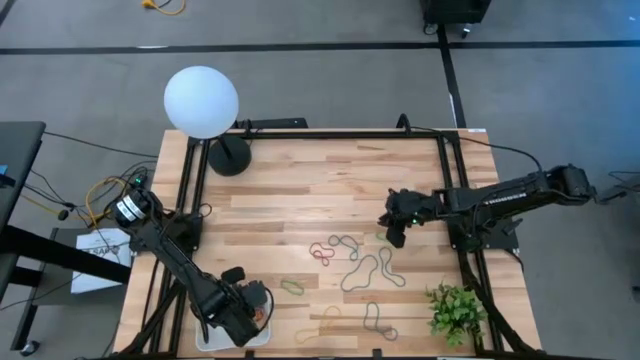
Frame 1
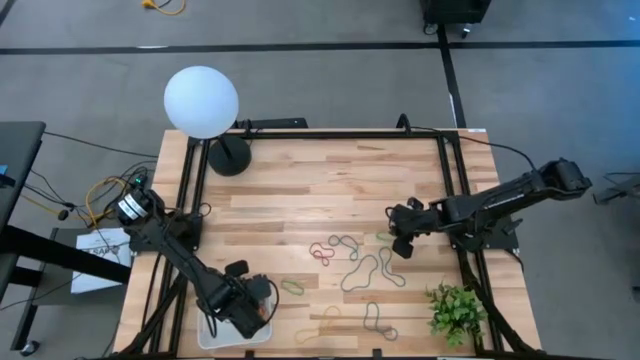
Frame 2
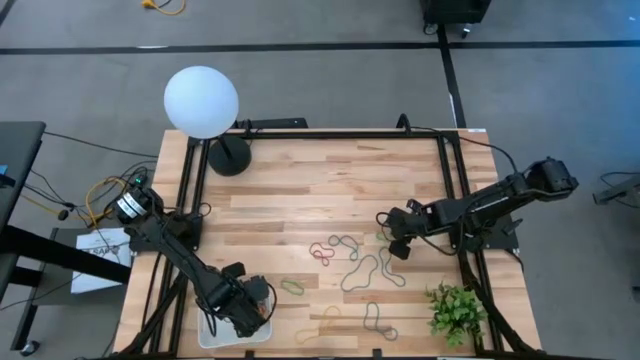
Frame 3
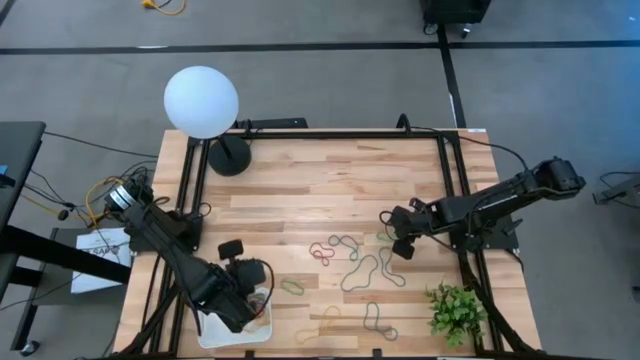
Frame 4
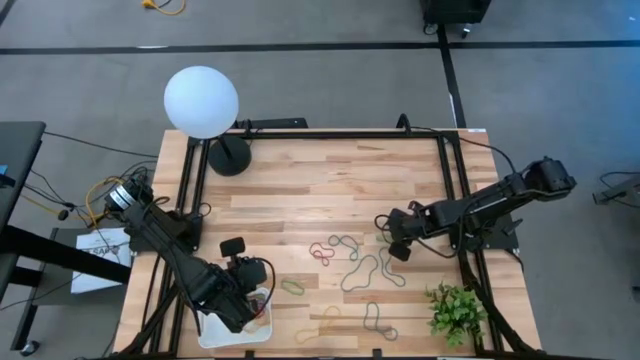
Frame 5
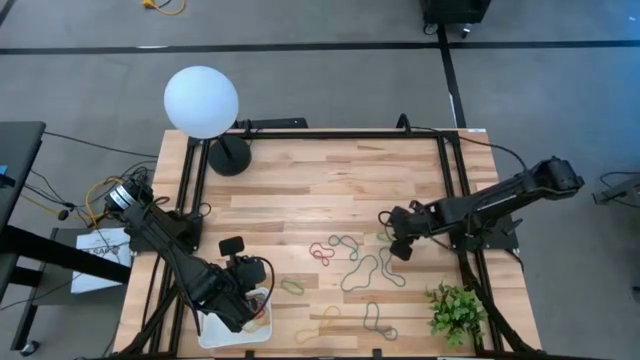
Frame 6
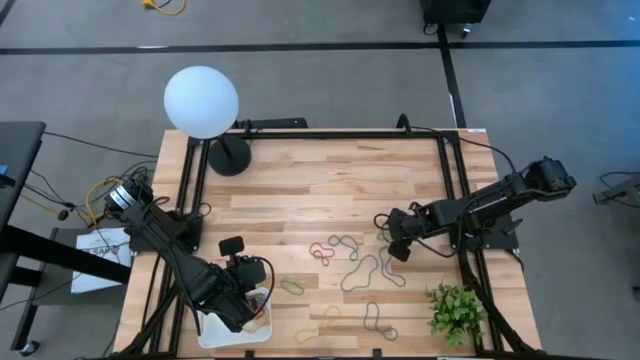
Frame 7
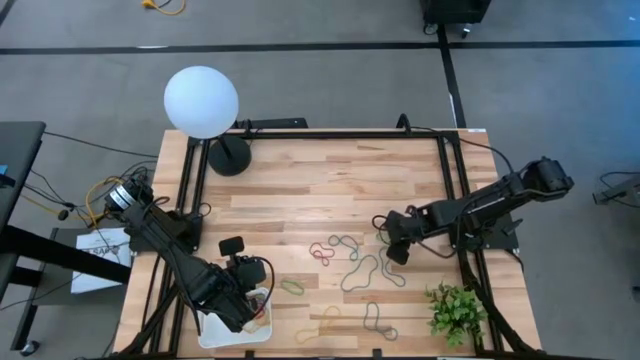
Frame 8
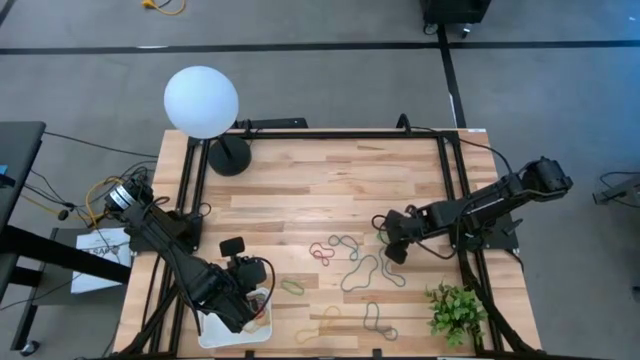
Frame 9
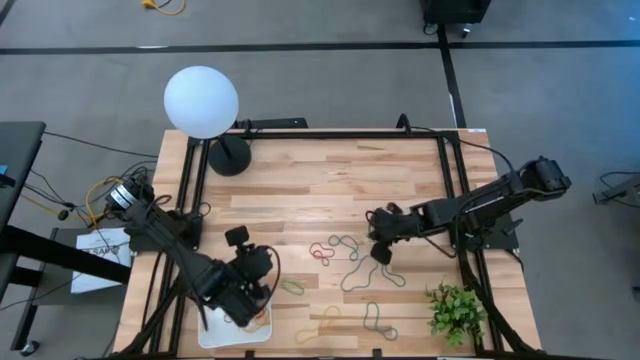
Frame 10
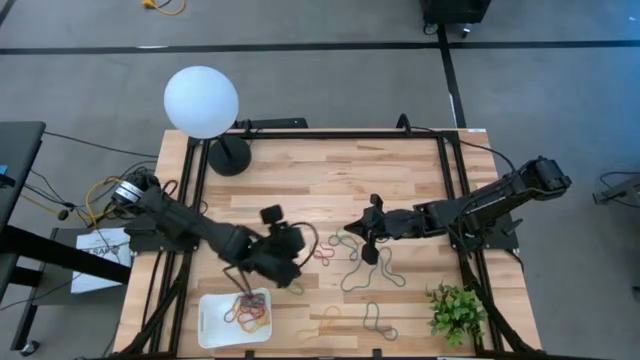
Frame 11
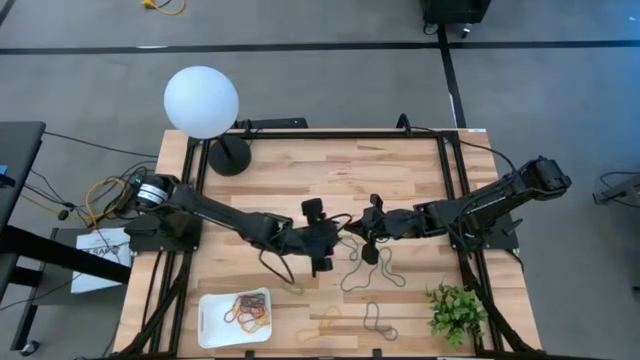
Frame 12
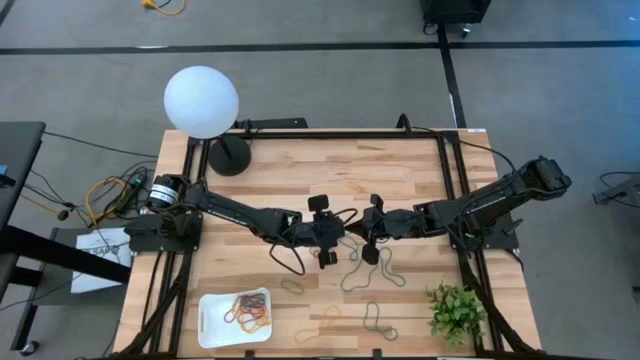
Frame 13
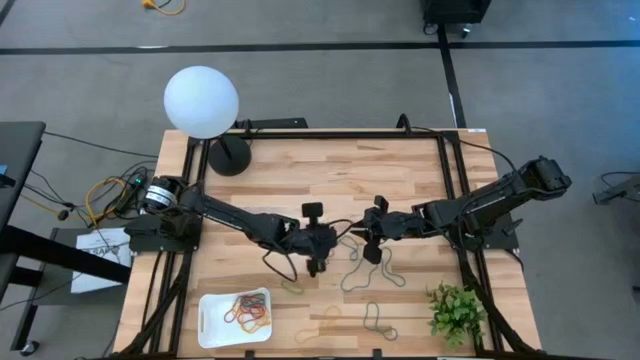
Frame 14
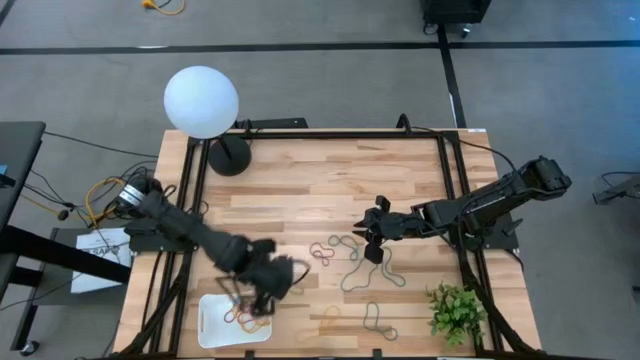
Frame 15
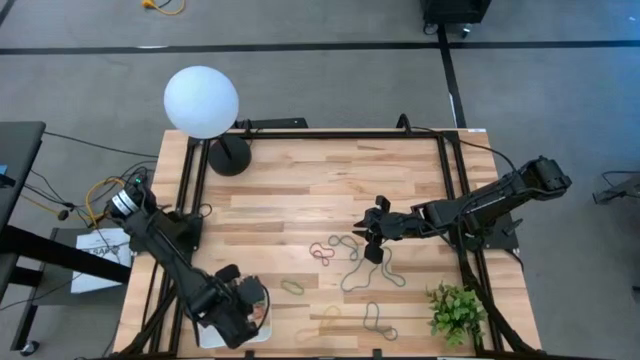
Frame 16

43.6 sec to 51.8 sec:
Task: Pick and place items into bin
Put the green rubber band into the bin

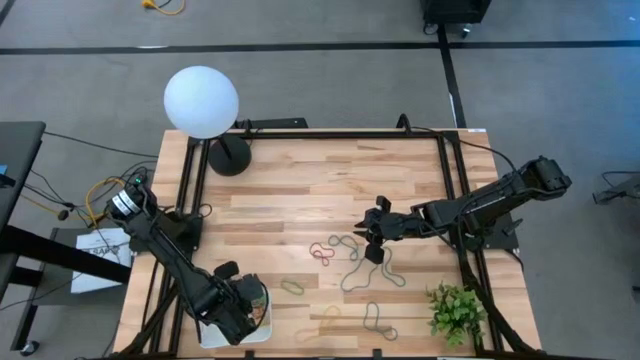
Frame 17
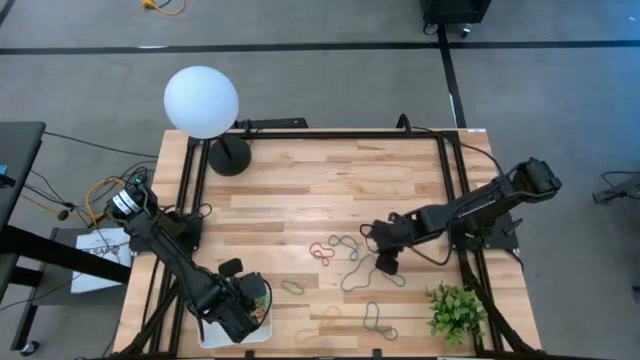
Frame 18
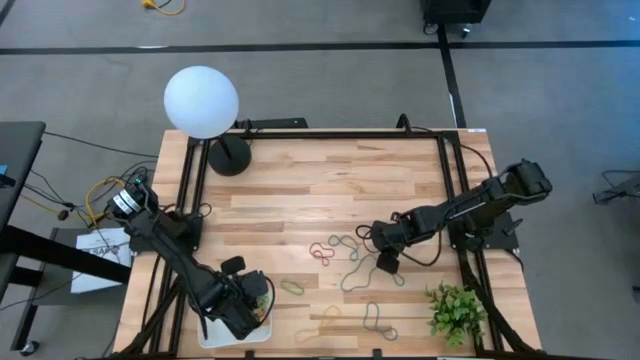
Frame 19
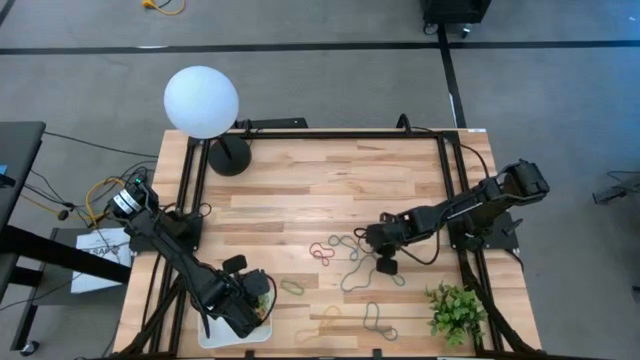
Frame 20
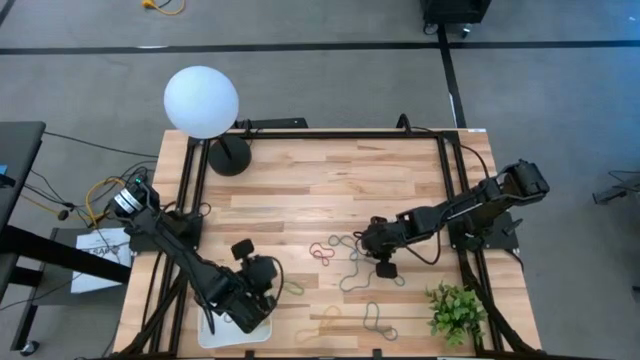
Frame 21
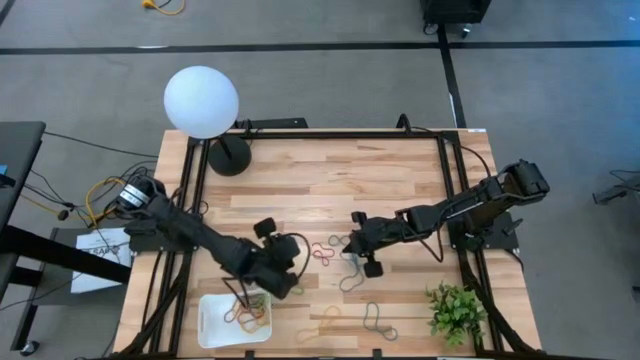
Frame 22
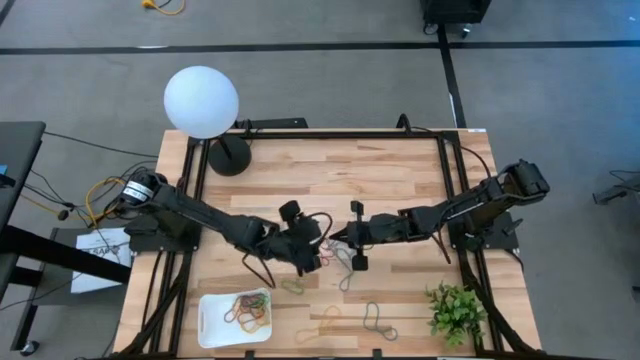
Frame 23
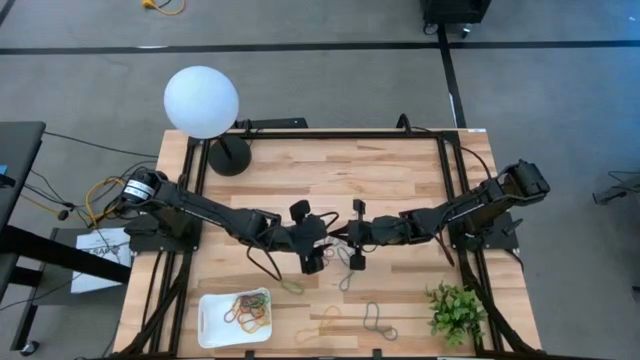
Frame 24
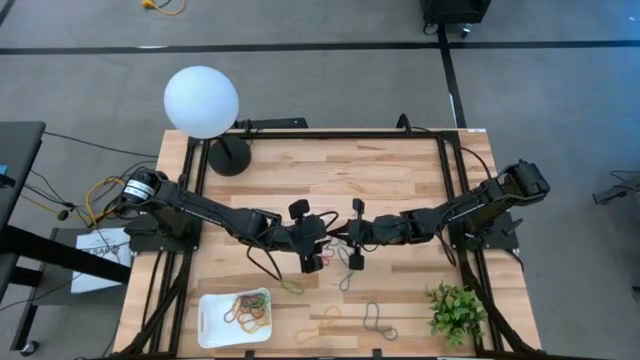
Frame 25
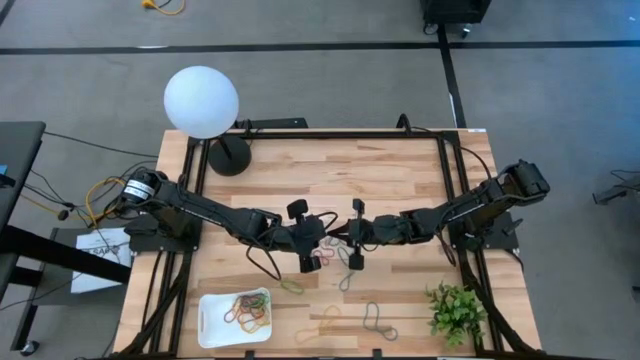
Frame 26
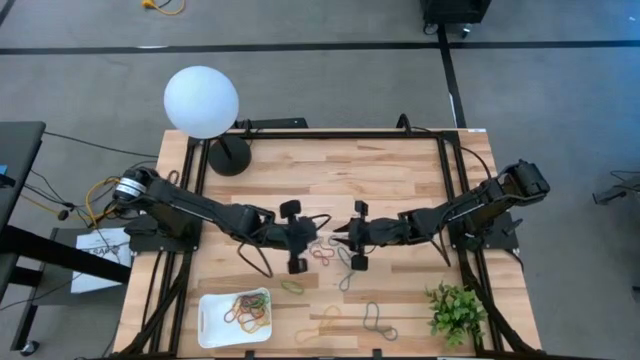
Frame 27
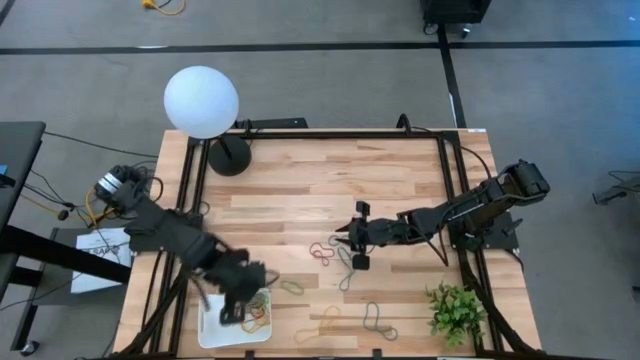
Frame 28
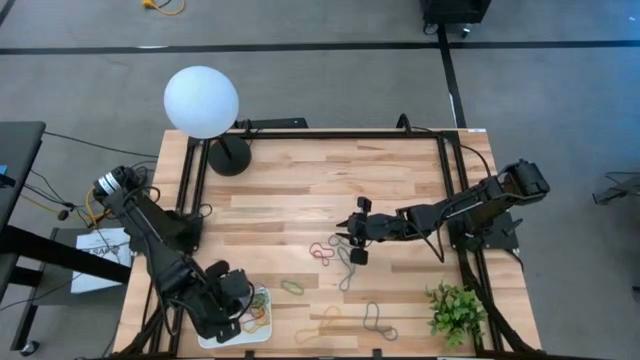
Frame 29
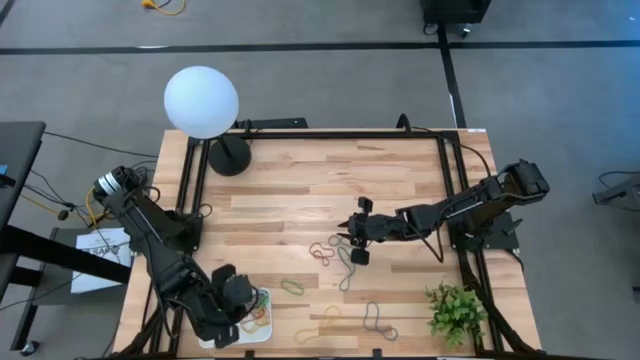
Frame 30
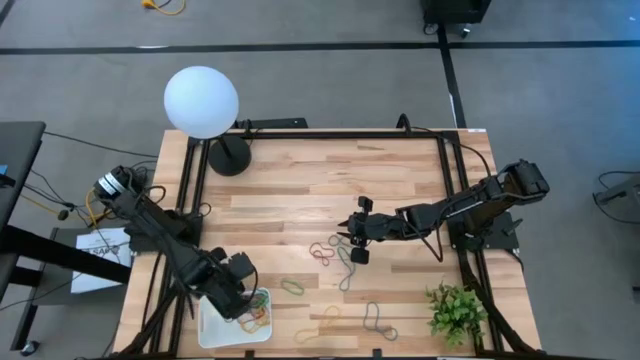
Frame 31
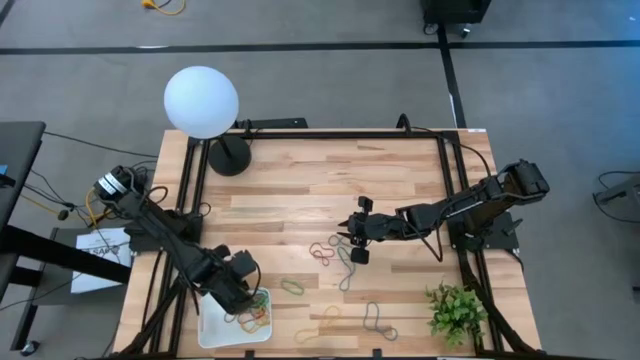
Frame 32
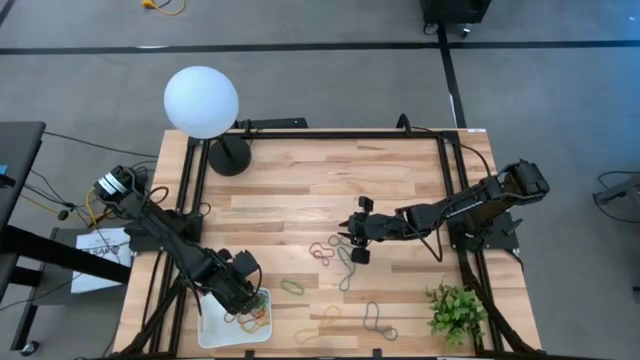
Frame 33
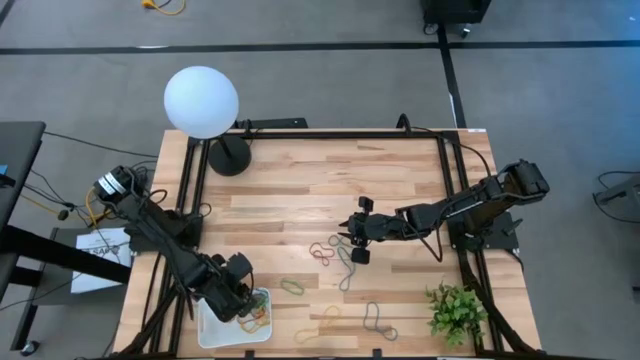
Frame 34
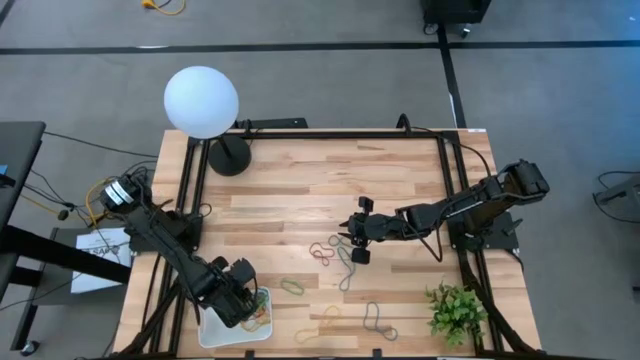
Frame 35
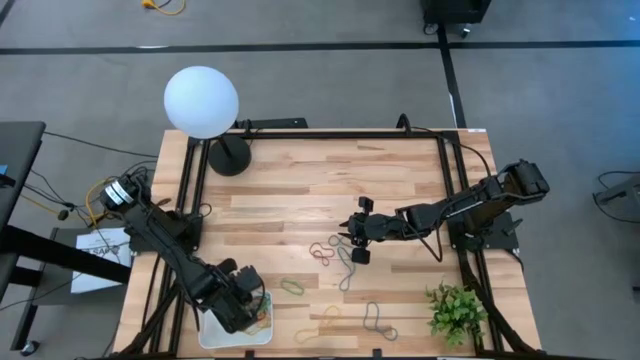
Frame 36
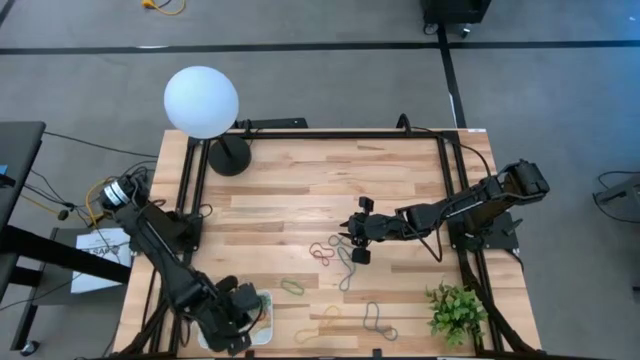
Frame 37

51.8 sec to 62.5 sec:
Put the blue rubber band into the bin

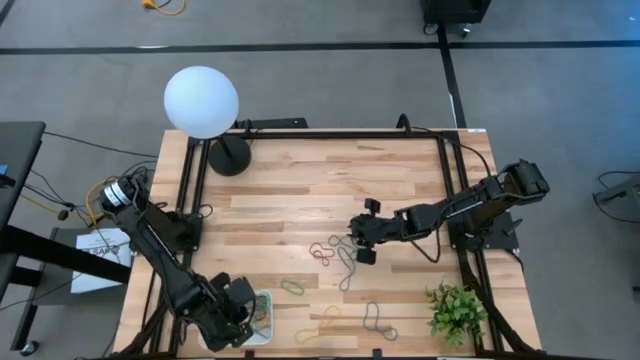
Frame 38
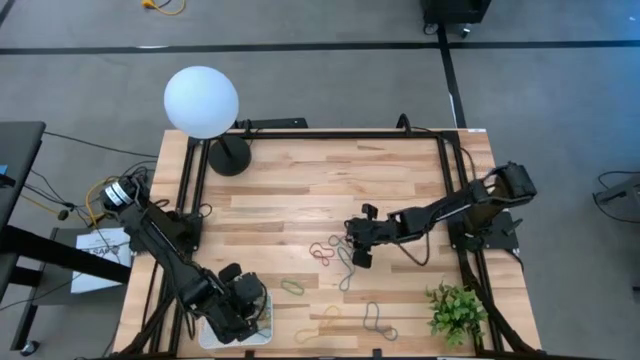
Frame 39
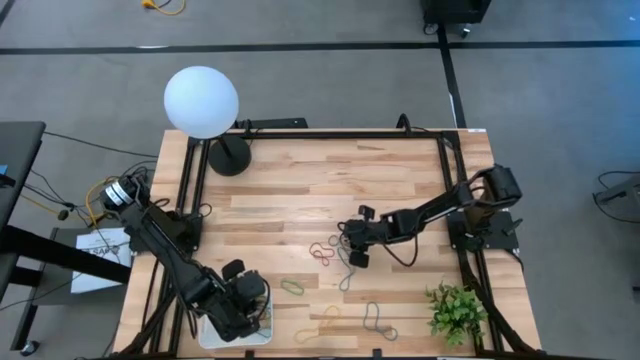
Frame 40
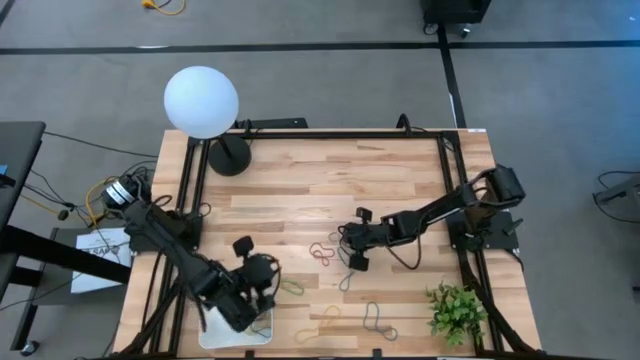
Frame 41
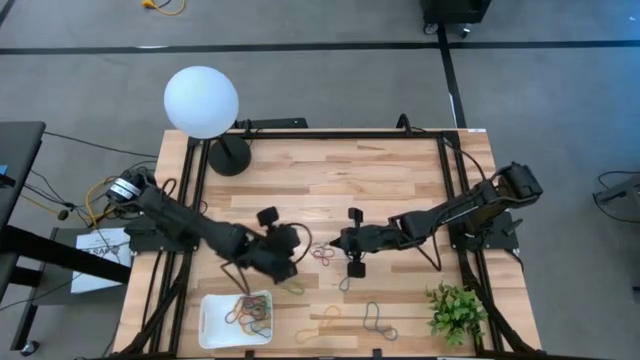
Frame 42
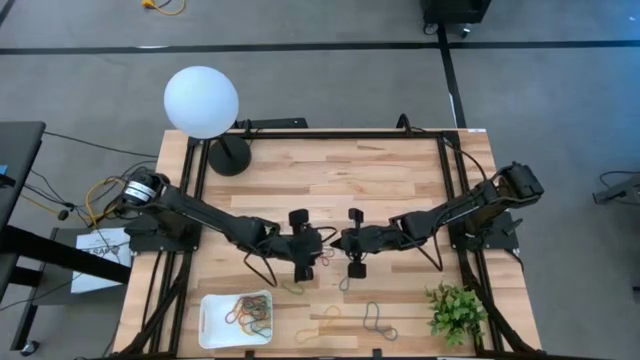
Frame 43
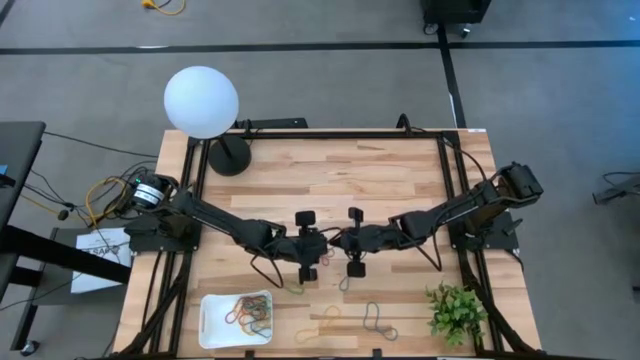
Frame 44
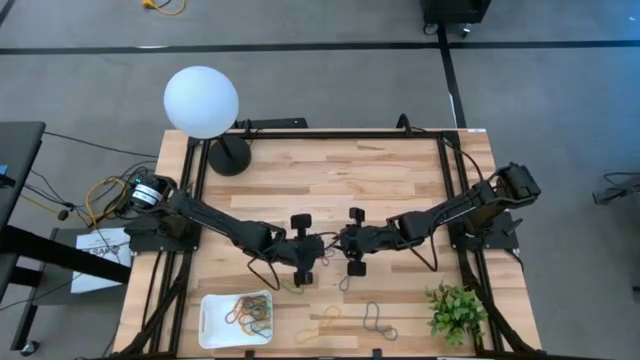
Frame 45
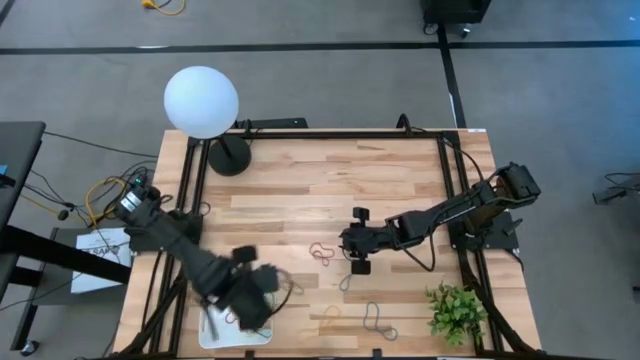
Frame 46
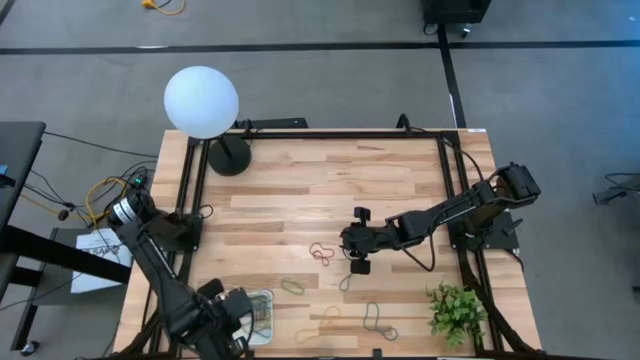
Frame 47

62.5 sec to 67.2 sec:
Put the blue rubber band into the bin
